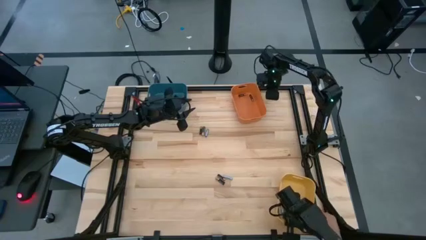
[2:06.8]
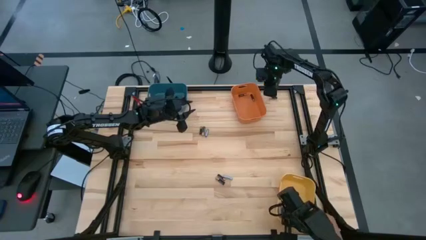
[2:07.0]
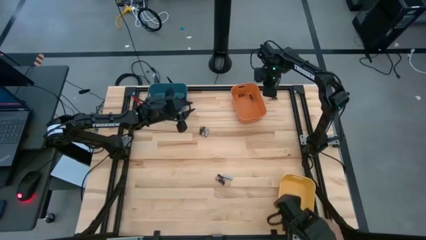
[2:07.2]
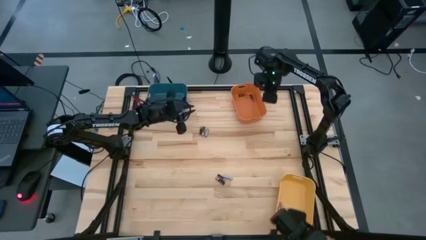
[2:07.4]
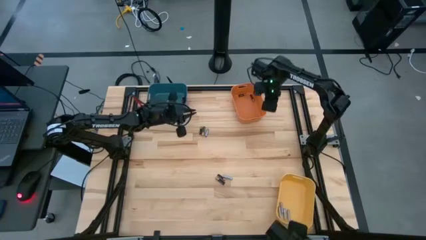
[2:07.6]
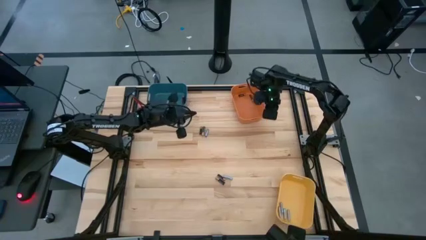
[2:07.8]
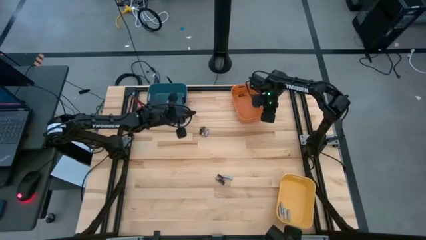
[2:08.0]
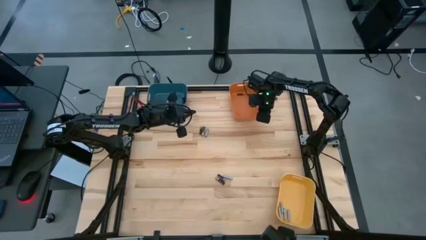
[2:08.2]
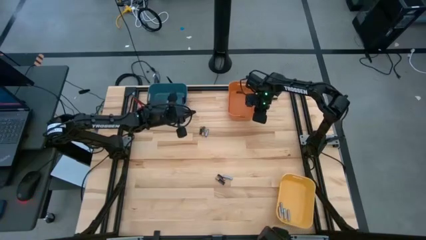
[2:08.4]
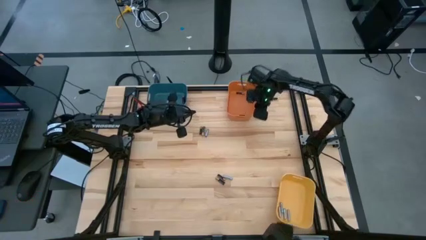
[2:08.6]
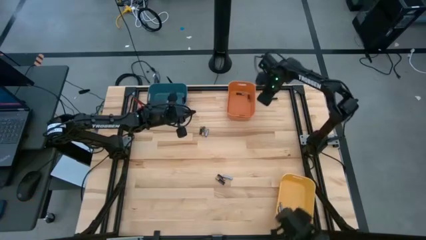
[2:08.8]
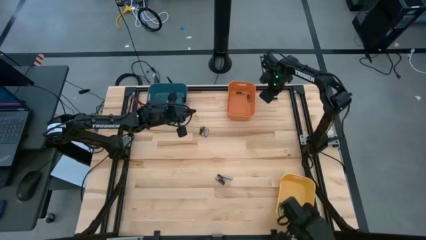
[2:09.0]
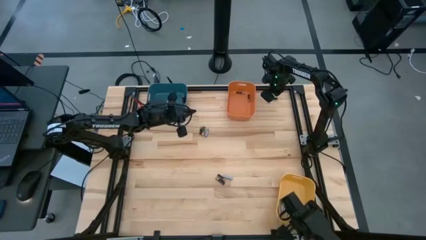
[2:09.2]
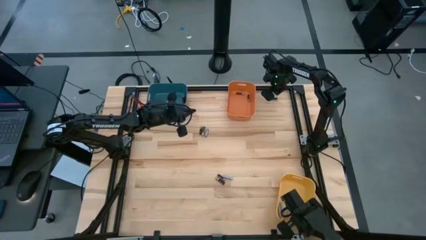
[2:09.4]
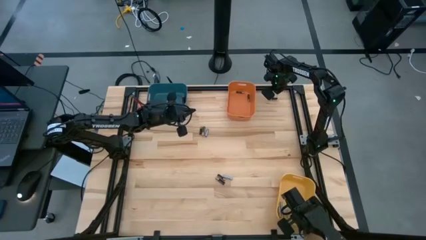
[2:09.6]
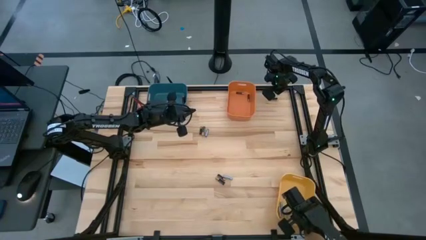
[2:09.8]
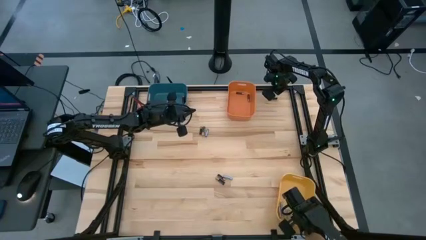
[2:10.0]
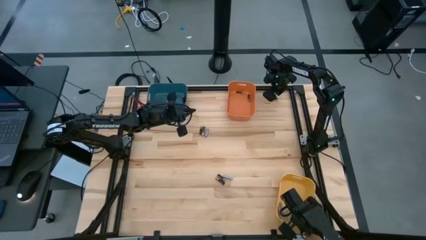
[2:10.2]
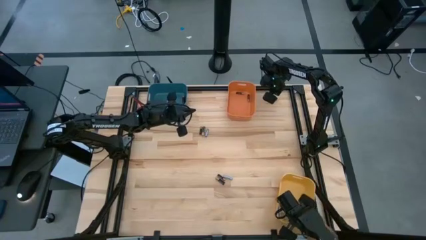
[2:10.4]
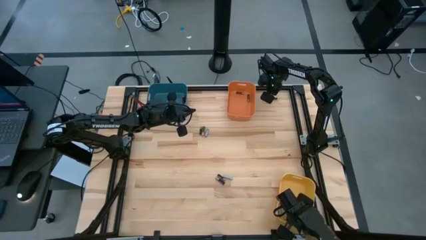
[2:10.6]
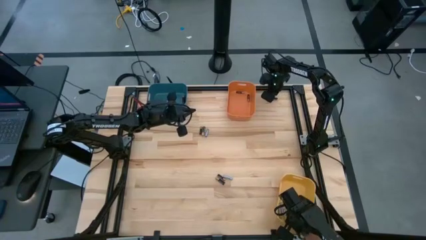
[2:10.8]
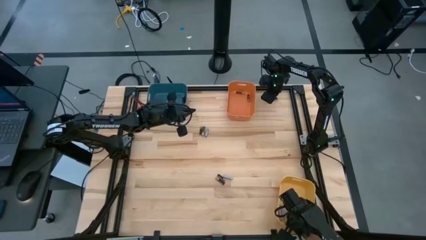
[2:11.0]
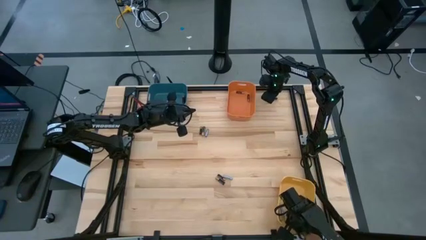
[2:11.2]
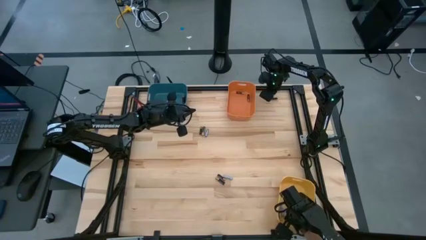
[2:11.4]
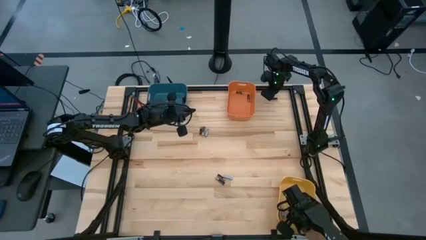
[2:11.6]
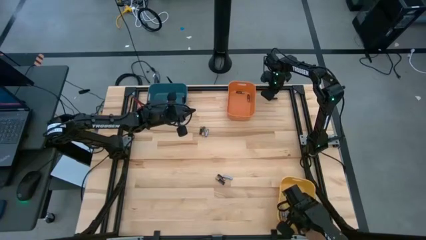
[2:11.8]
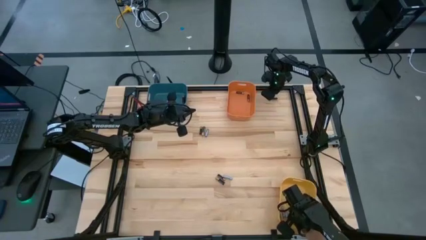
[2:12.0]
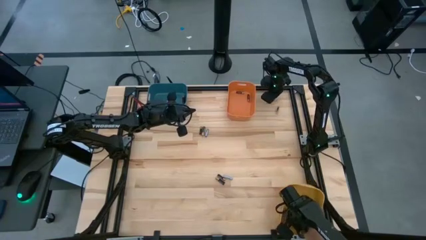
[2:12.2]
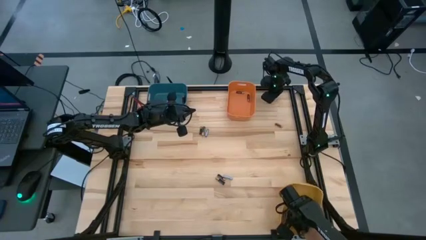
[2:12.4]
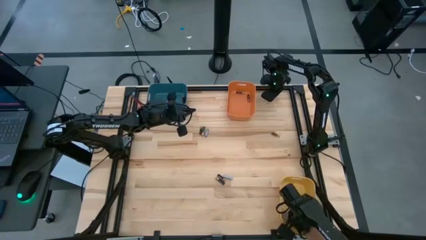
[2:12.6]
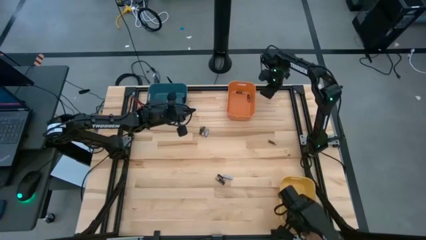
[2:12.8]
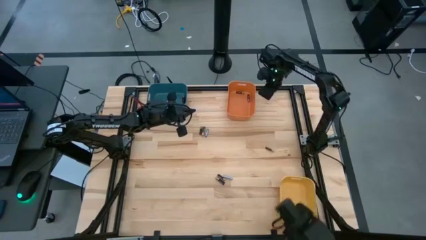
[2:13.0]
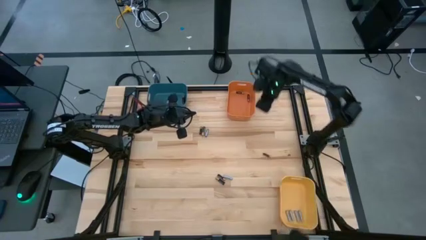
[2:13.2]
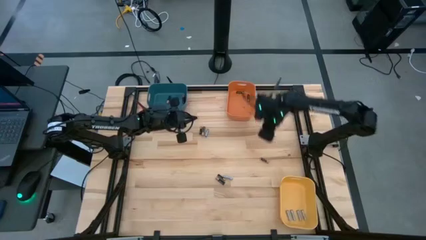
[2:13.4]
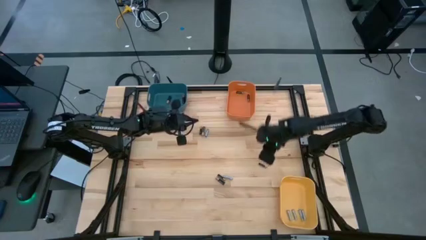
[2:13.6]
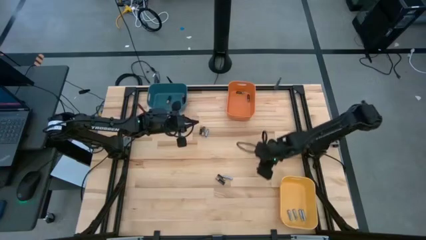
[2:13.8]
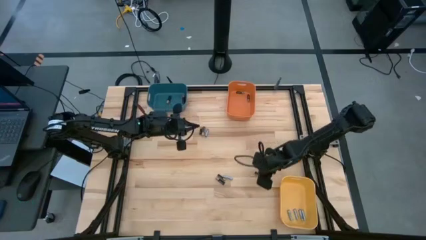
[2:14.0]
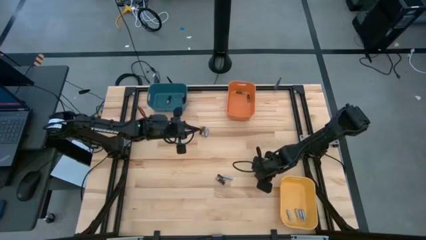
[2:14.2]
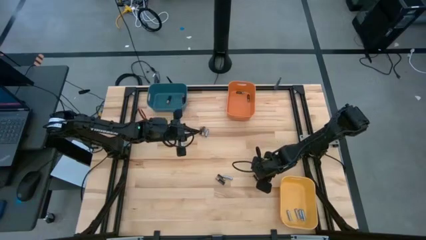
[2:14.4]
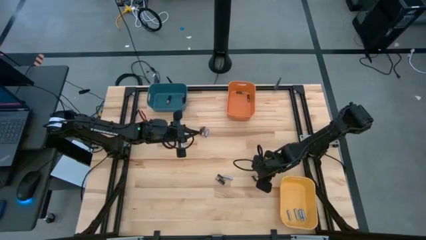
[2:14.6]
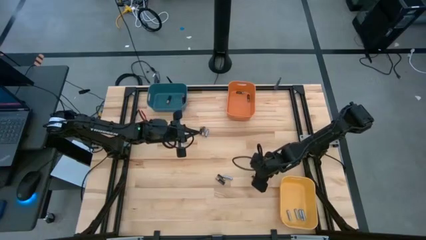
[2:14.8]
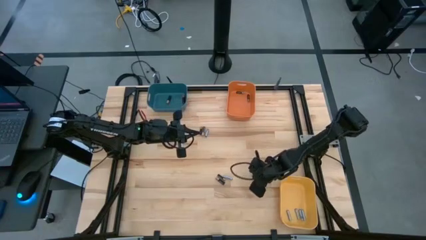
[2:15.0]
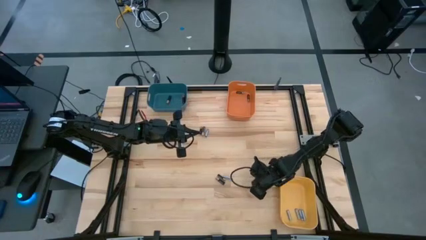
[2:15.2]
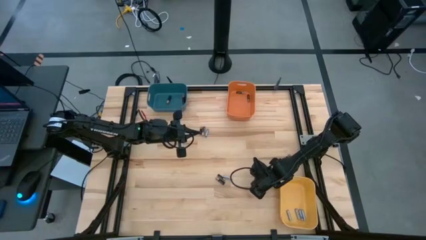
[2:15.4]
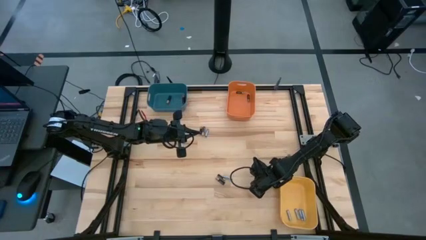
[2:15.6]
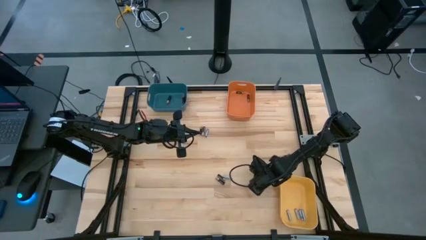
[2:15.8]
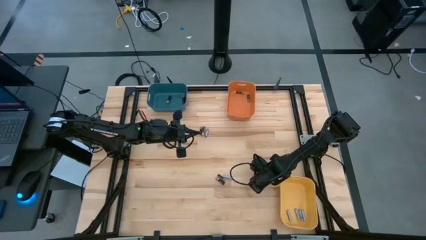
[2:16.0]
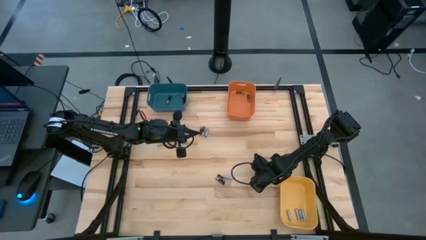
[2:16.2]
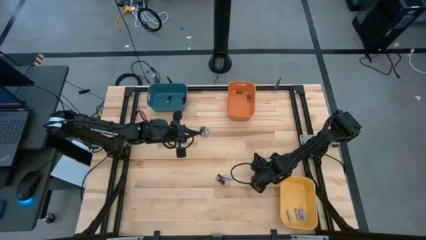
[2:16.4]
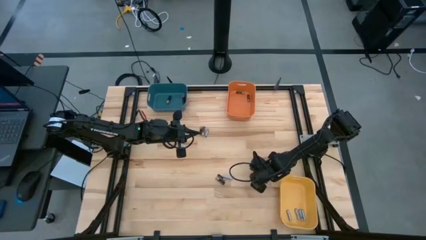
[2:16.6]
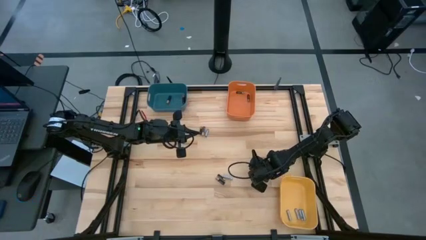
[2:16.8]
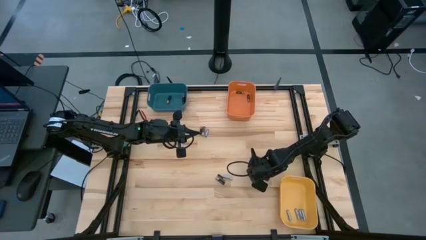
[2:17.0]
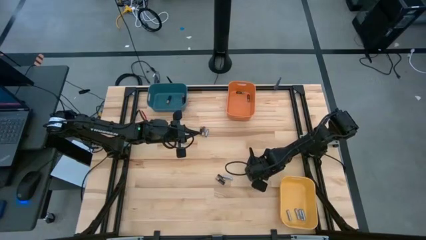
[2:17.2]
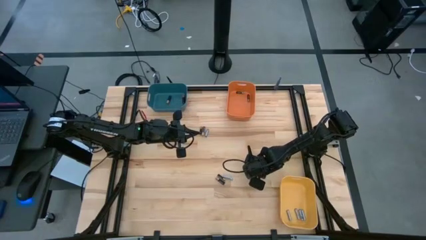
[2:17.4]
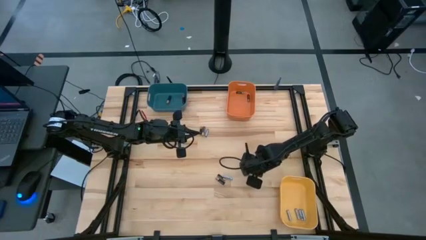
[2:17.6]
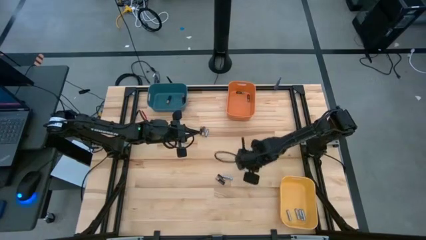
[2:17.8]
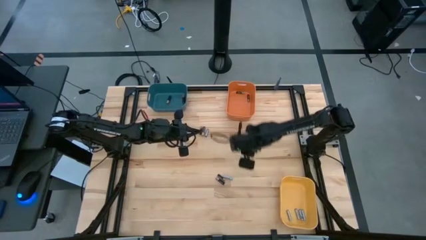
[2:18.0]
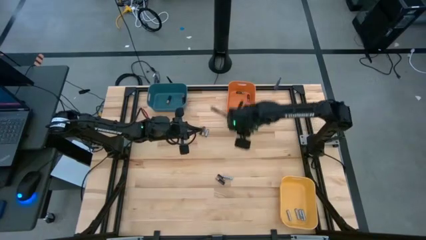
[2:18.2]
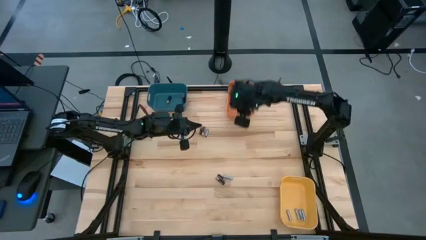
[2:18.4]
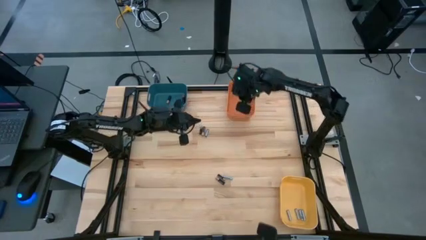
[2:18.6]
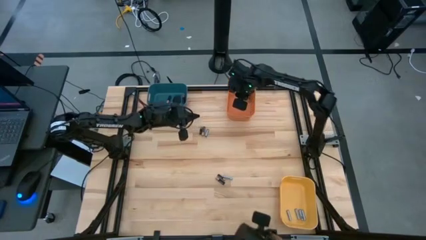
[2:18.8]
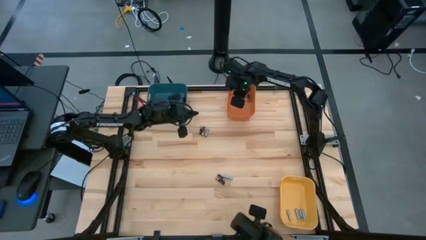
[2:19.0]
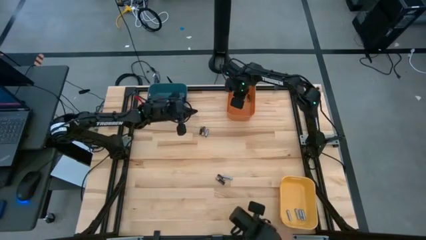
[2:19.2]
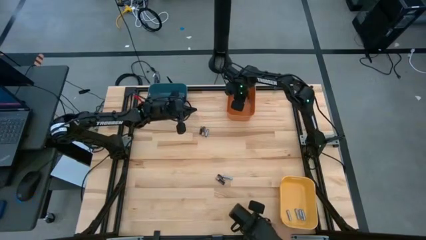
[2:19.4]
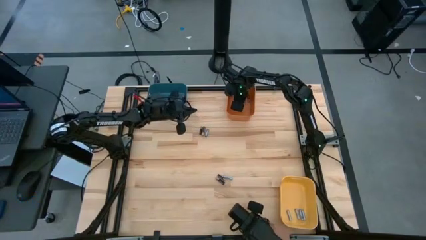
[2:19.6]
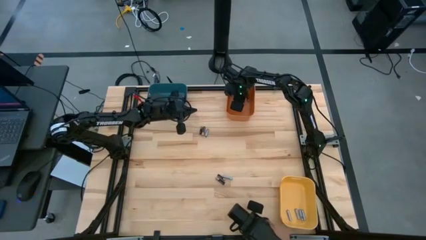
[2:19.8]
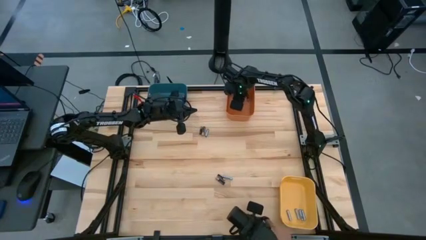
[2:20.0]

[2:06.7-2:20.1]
Task: Sort batteries
Put the small black battery into the orange bin
